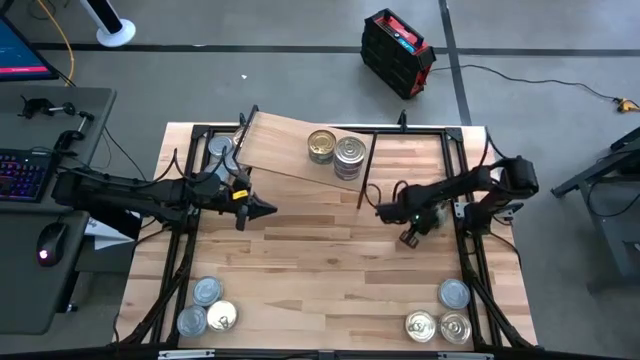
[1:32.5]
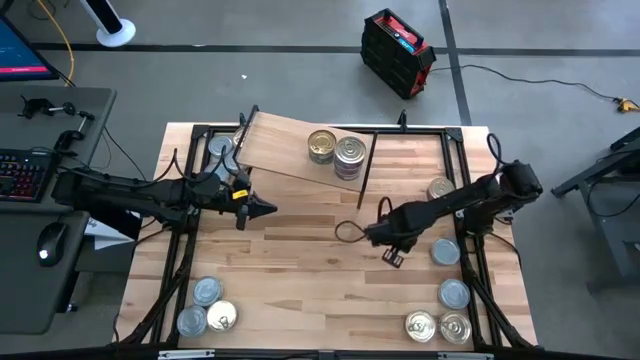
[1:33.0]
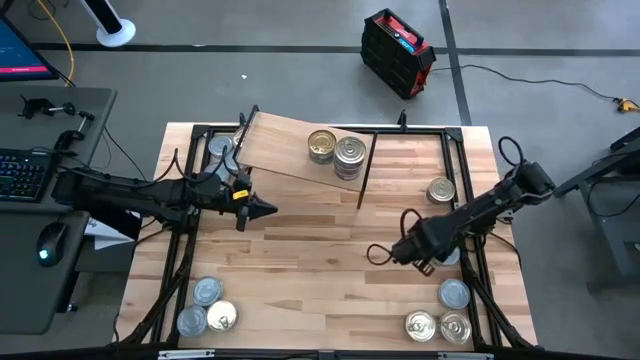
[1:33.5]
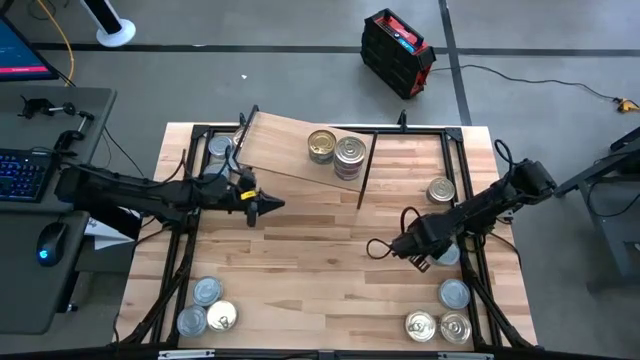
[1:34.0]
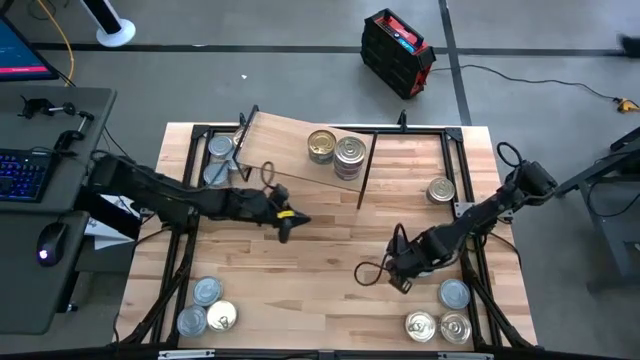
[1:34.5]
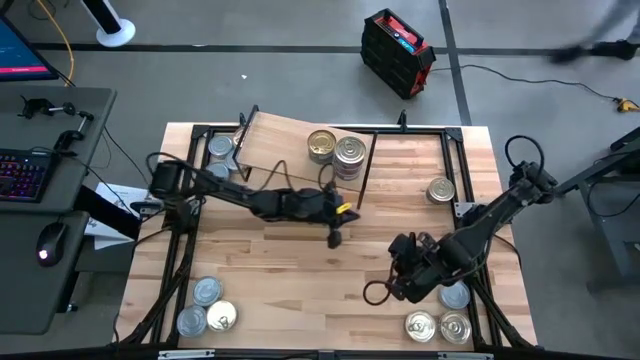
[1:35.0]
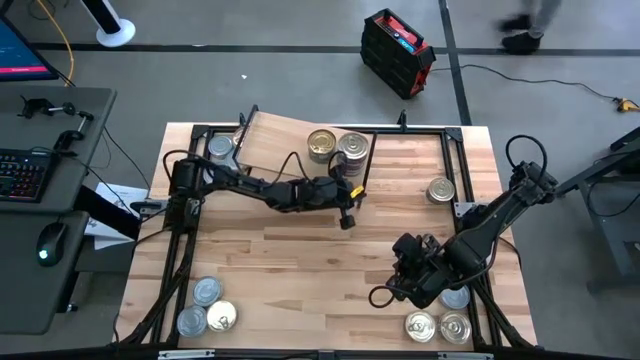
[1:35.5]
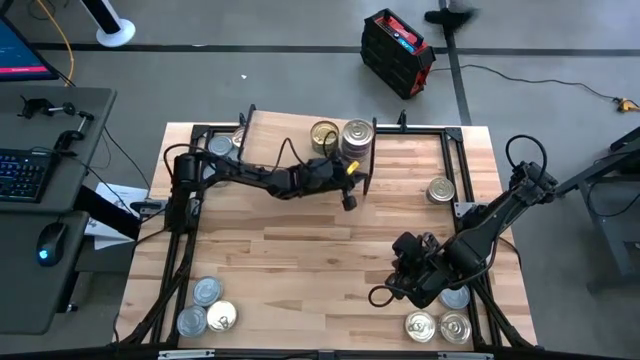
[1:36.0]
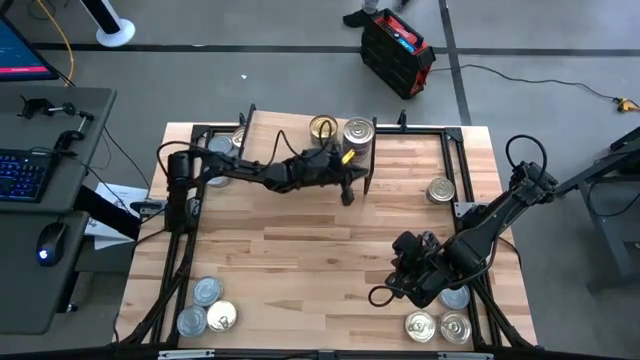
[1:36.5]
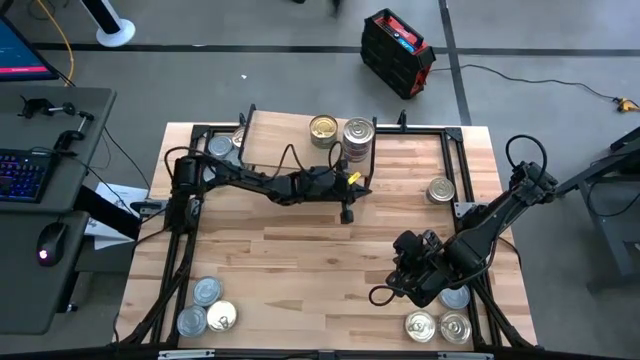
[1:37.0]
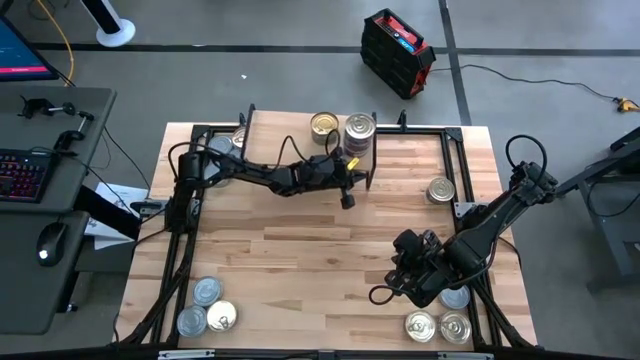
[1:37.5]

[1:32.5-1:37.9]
Task: Stack canned seafood by type on shelf
Adjust the shelf

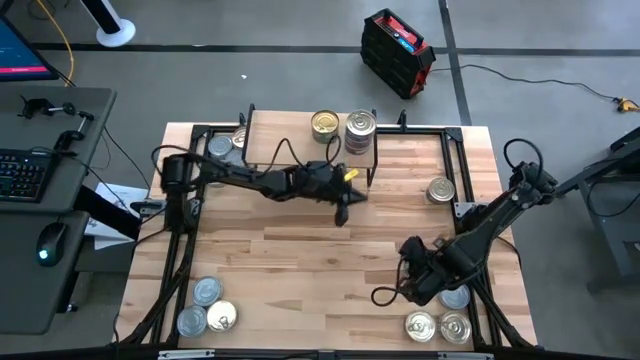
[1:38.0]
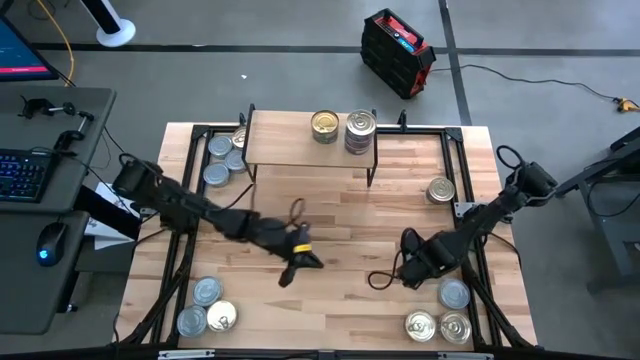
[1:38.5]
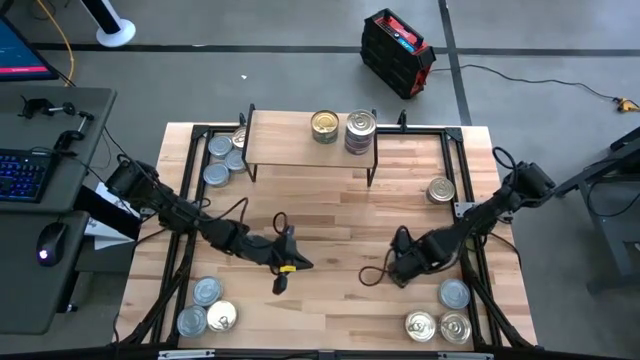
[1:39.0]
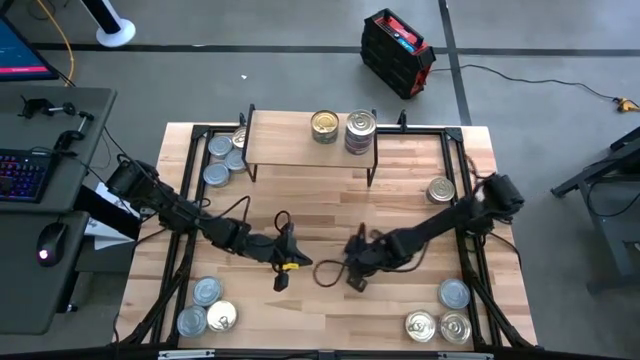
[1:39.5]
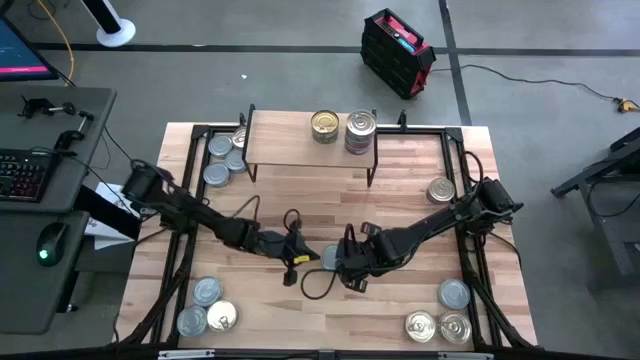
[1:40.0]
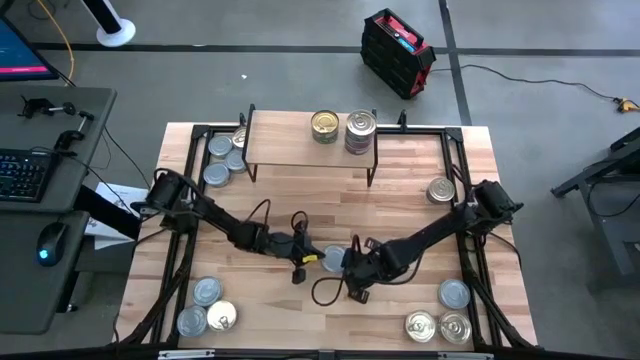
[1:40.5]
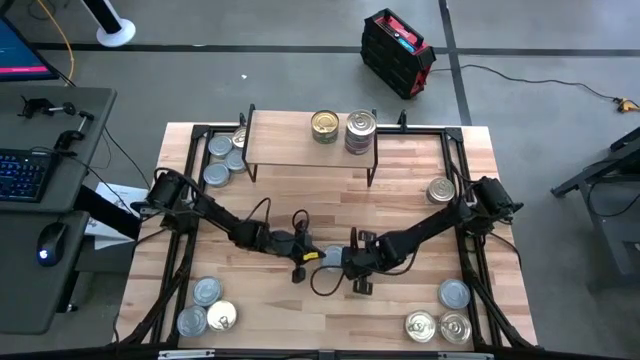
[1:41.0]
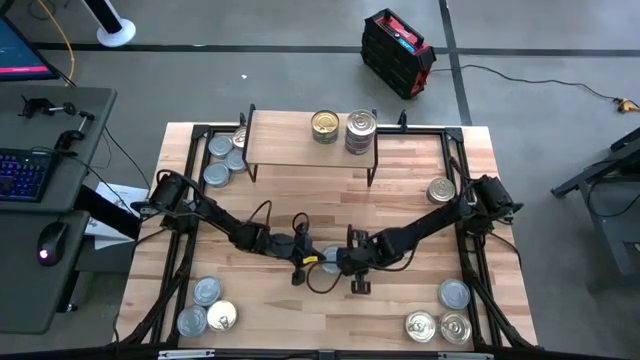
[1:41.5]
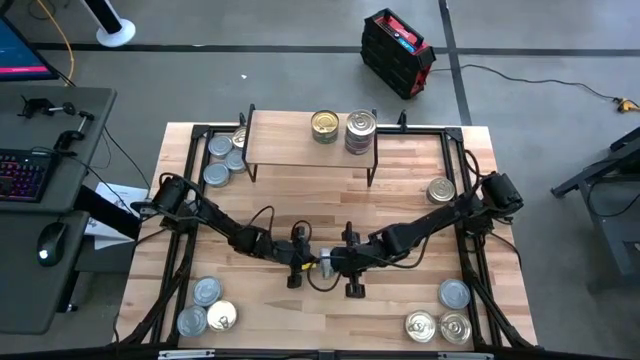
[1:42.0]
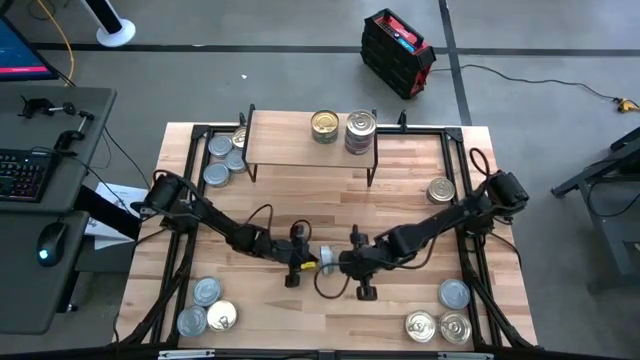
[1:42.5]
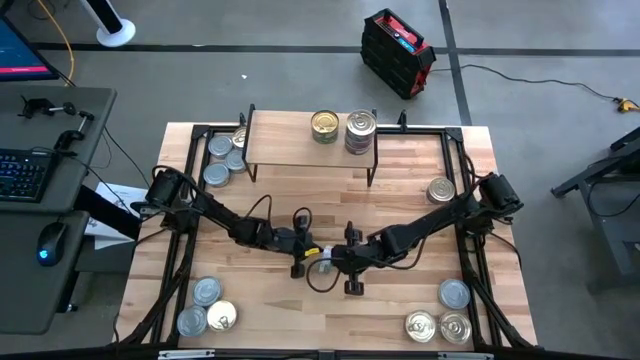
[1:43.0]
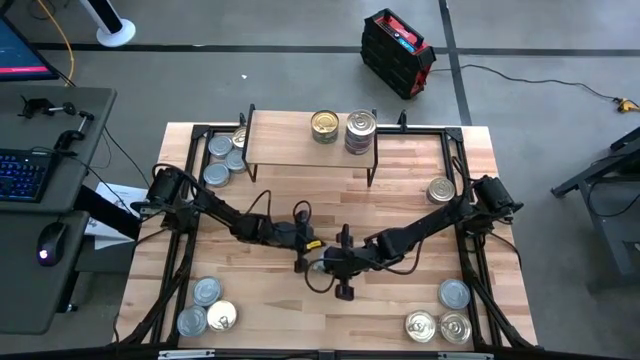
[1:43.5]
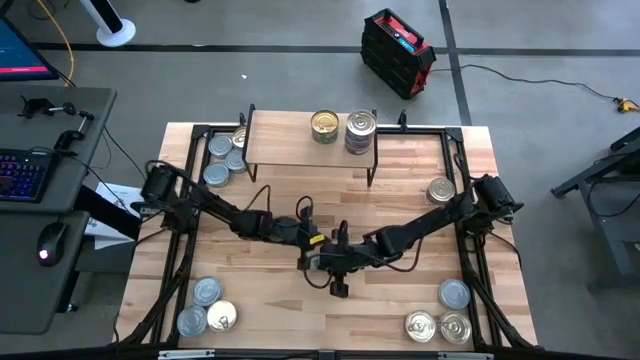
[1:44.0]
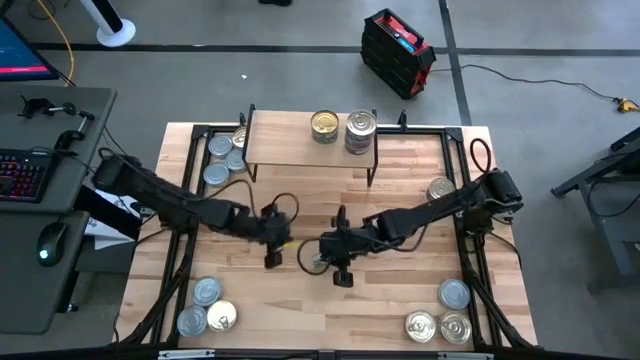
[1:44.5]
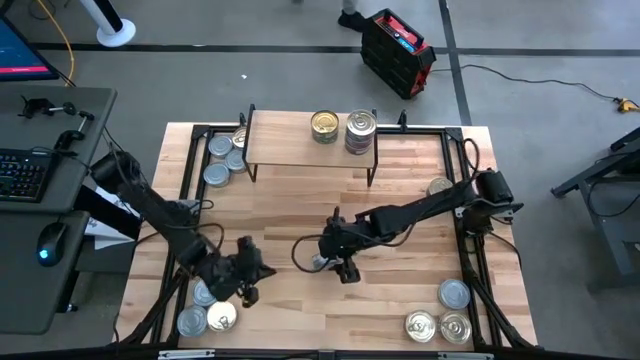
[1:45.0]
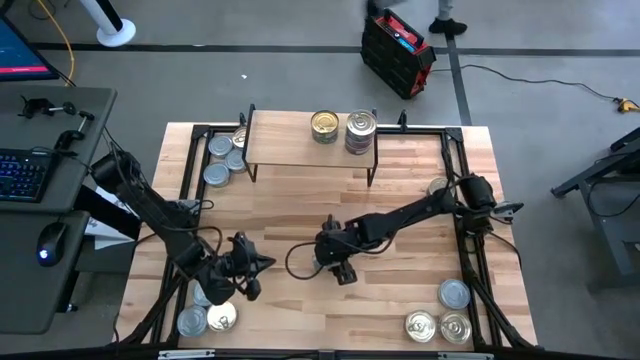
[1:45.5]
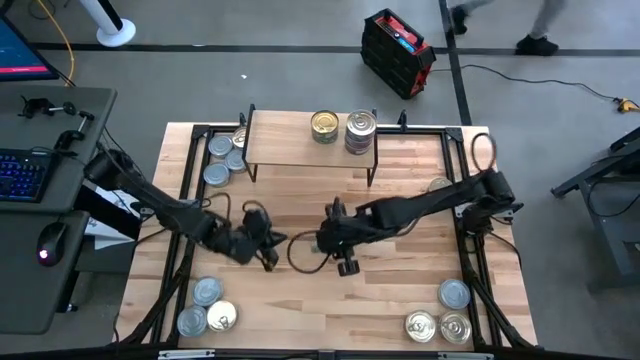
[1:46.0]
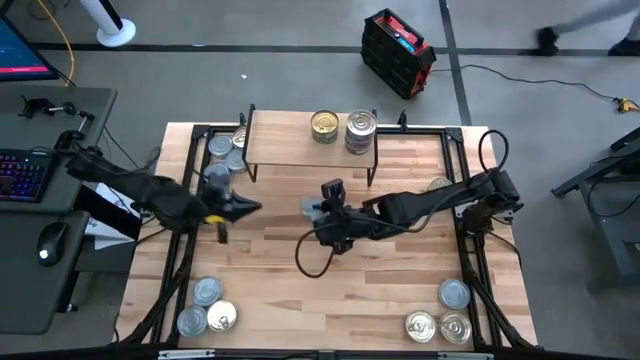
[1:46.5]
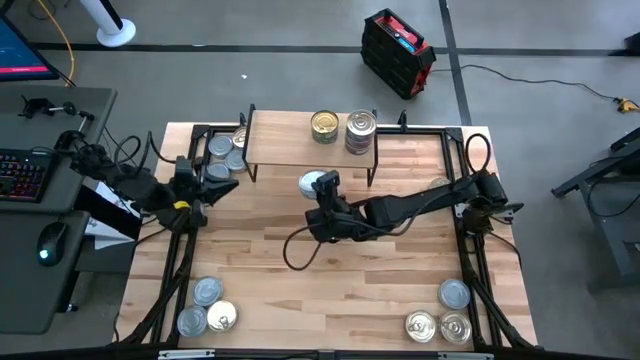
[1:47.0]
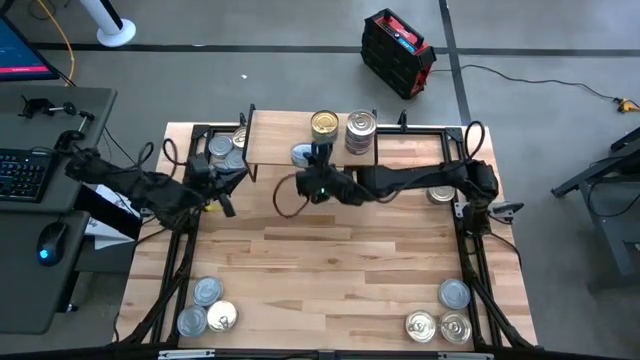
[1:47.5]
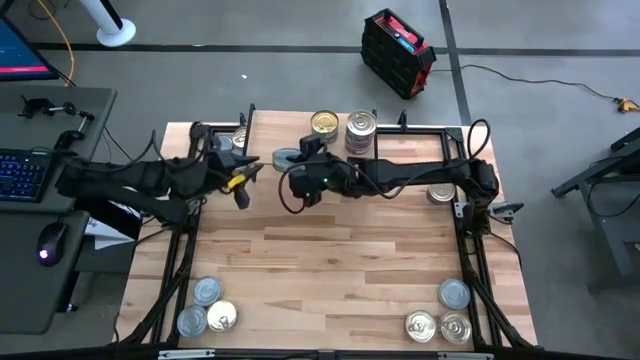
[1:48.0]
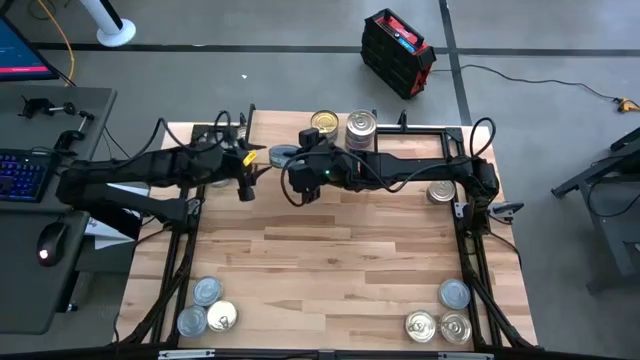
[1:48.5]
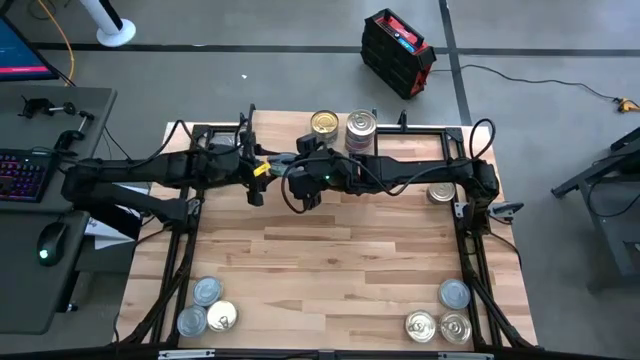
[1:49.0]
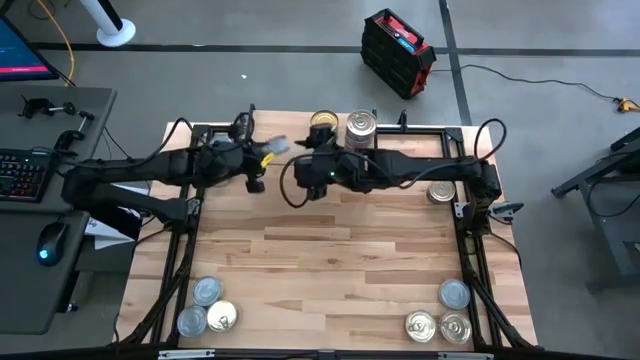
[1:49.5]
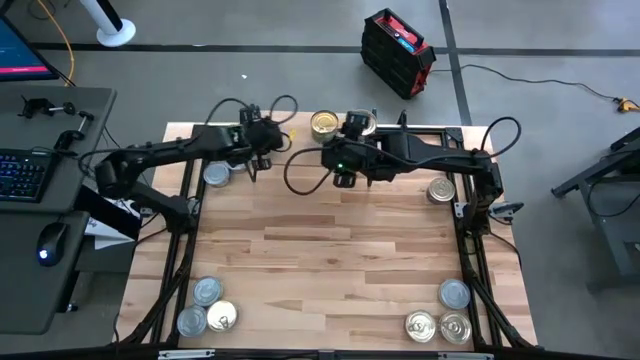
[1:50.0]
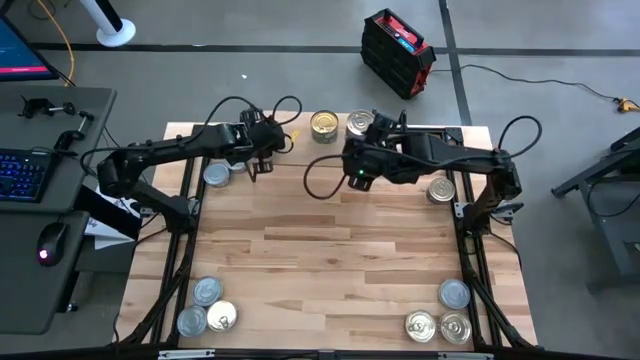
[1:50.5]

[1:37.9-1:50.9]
Put the green white tuna can on the shelf

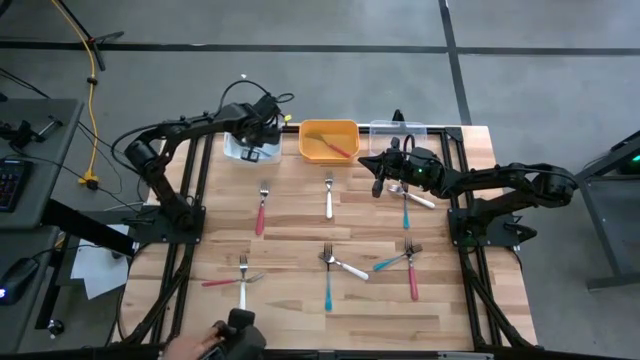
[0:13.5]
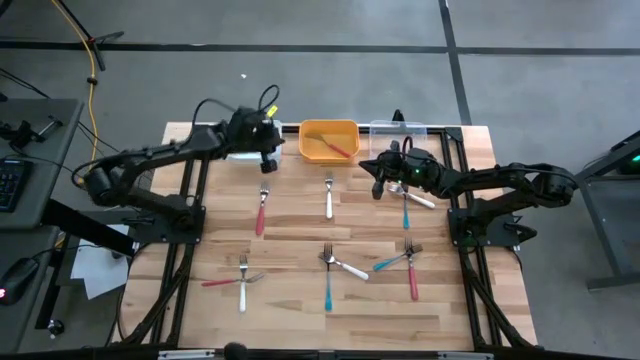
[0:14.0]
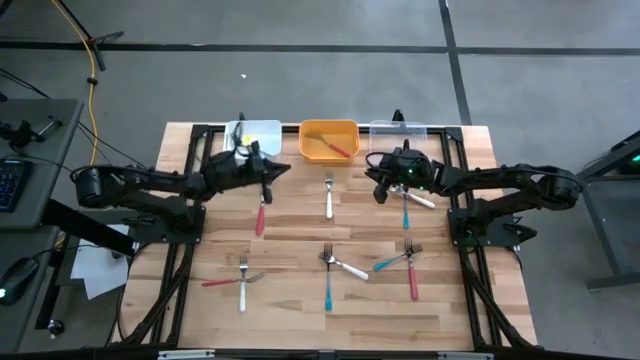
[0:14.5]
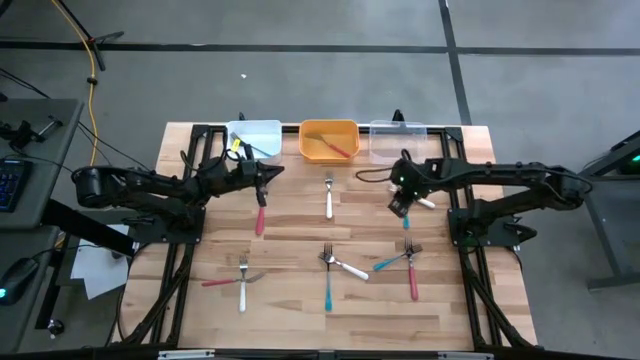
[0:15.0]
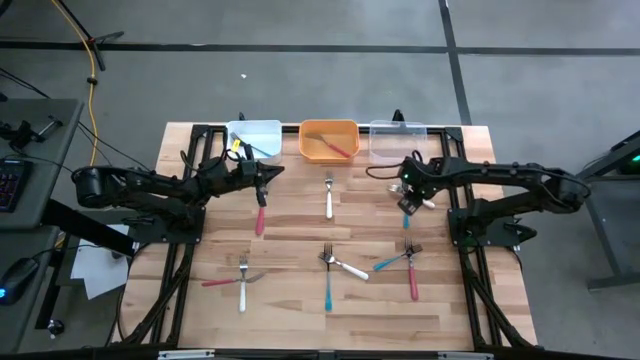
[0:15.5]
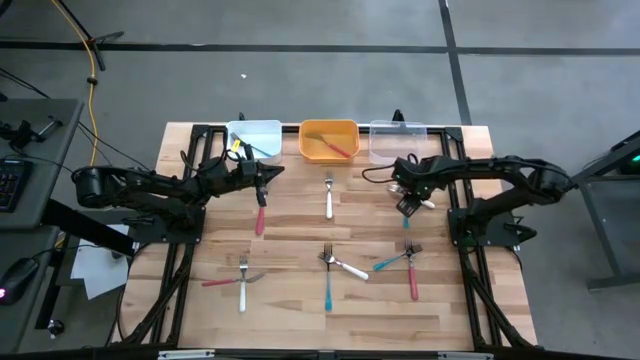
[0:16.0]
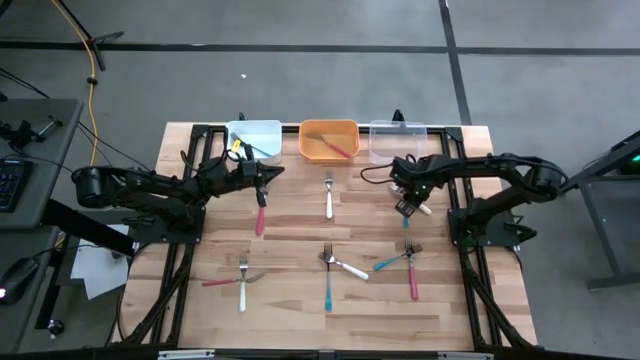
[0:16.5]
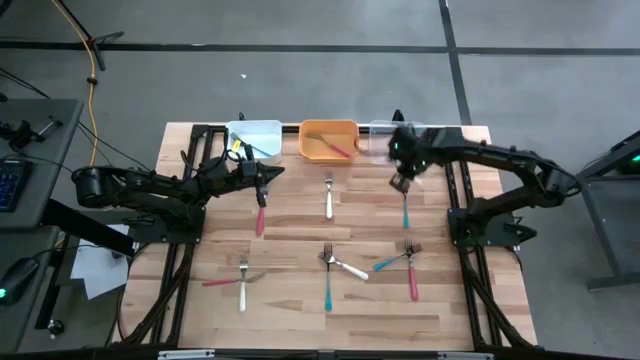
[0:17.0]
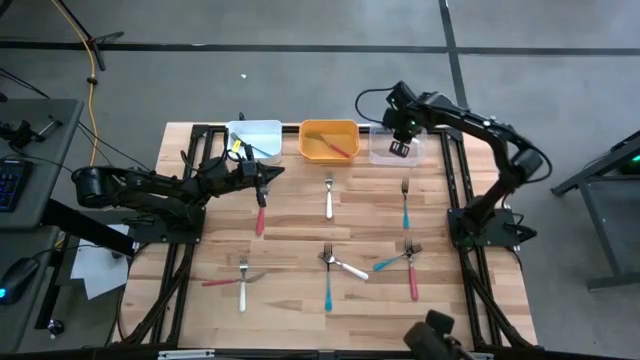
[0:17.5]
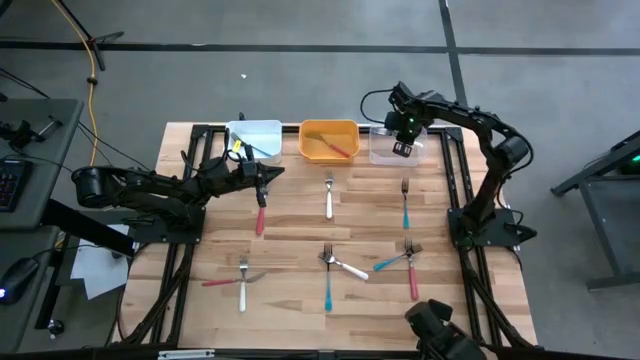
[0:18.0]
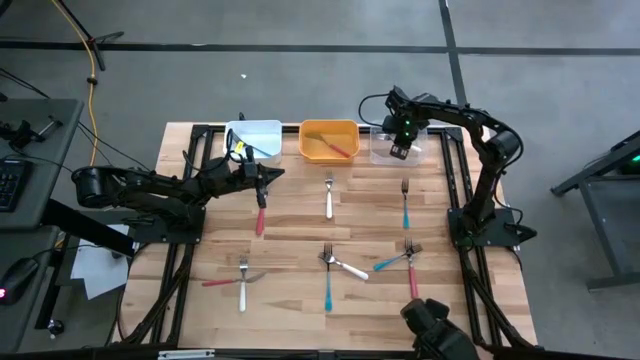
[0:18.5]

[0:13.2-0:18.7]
Task: Sort silverware by color (type)
Put the top right white fork into the transparent bin
